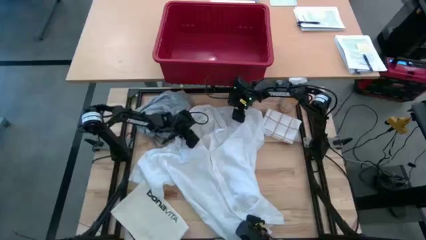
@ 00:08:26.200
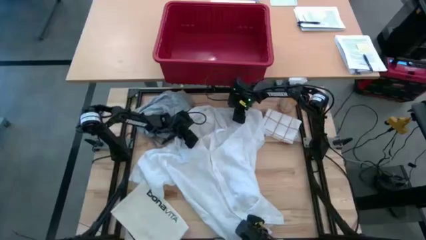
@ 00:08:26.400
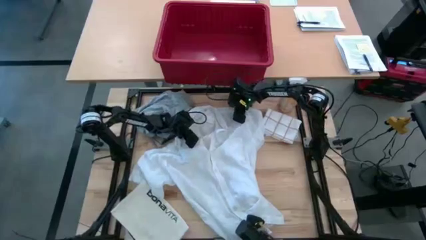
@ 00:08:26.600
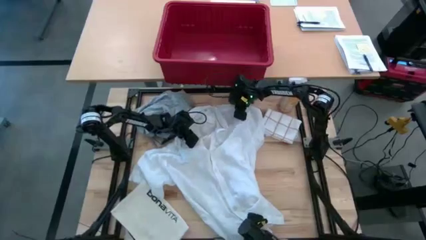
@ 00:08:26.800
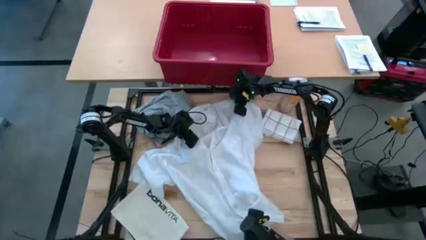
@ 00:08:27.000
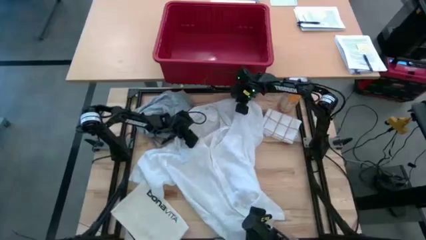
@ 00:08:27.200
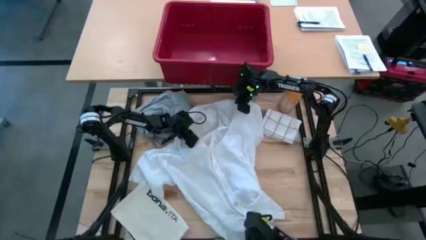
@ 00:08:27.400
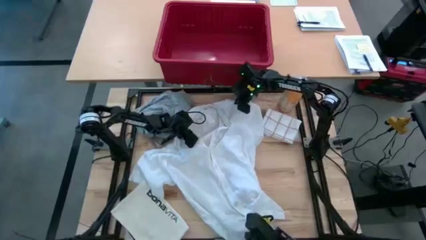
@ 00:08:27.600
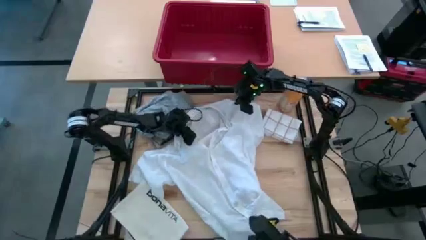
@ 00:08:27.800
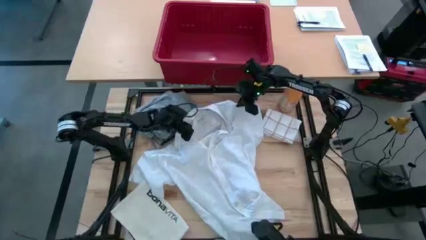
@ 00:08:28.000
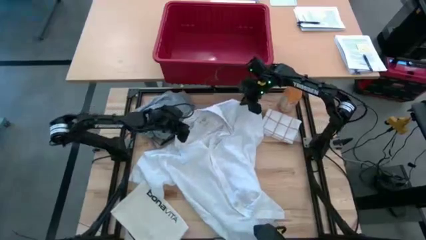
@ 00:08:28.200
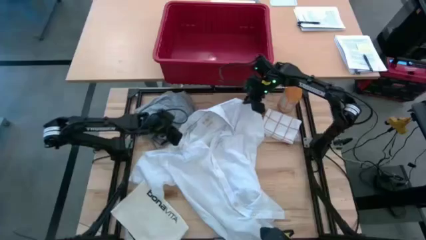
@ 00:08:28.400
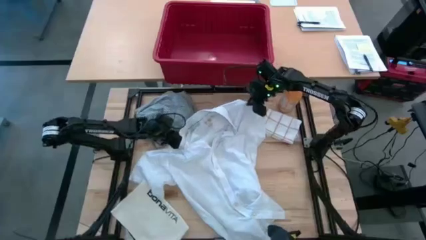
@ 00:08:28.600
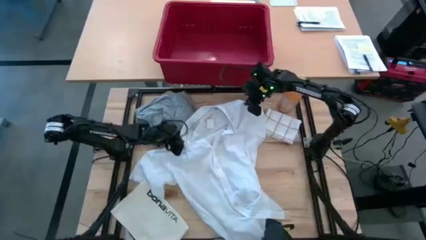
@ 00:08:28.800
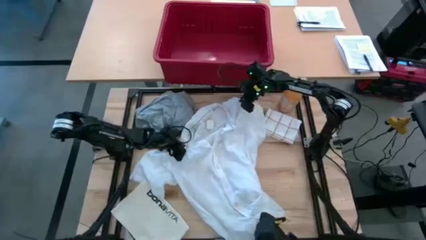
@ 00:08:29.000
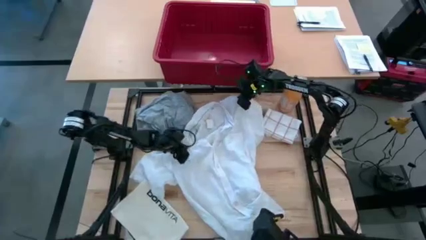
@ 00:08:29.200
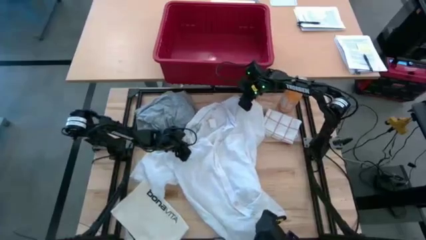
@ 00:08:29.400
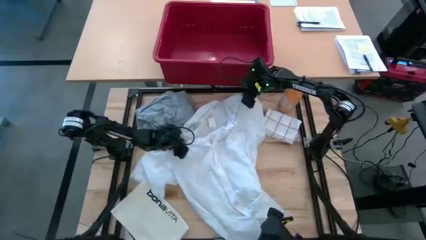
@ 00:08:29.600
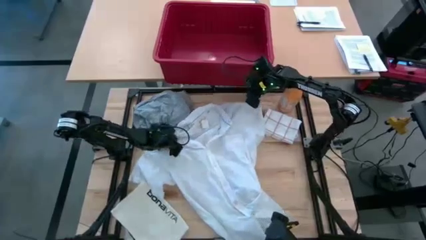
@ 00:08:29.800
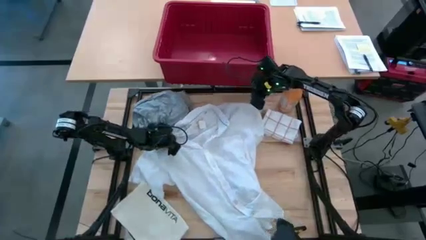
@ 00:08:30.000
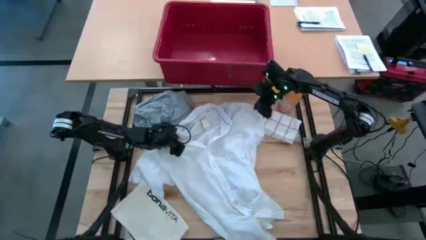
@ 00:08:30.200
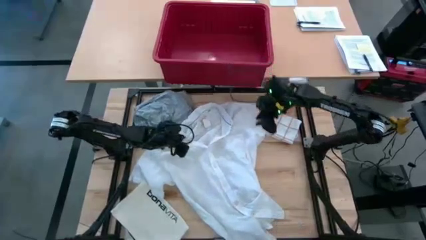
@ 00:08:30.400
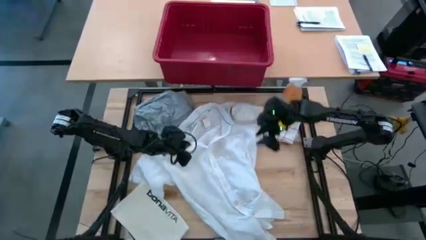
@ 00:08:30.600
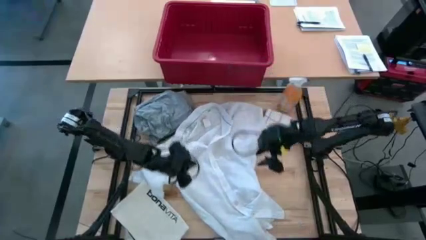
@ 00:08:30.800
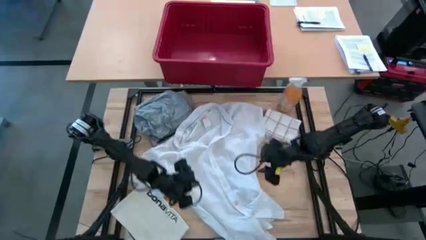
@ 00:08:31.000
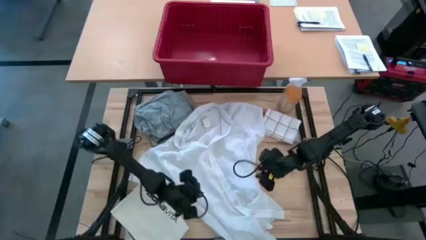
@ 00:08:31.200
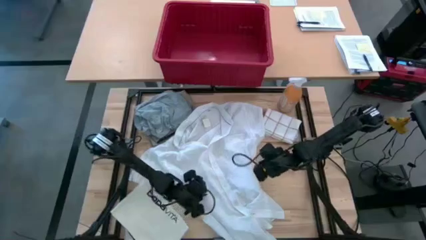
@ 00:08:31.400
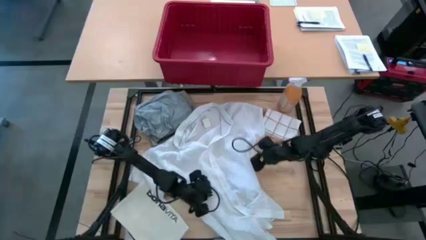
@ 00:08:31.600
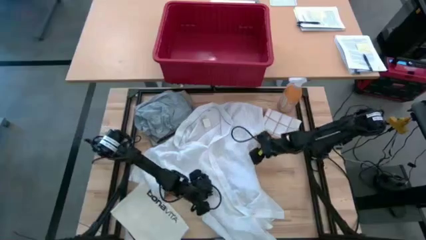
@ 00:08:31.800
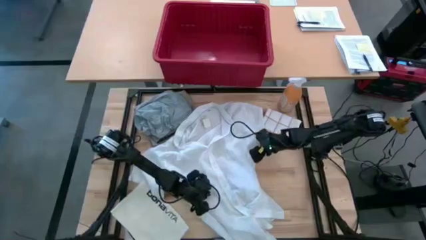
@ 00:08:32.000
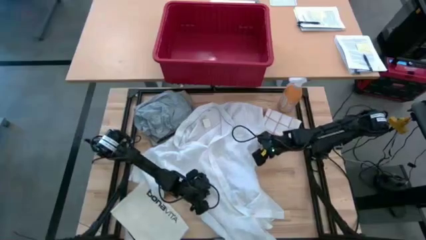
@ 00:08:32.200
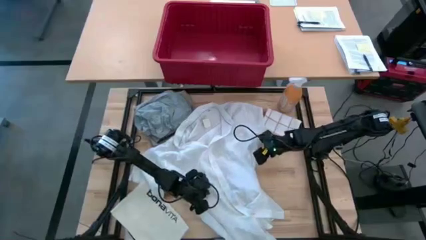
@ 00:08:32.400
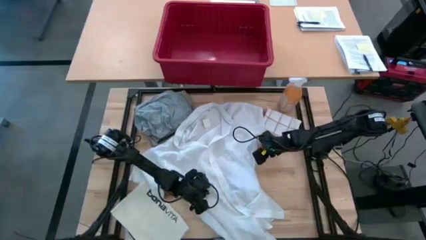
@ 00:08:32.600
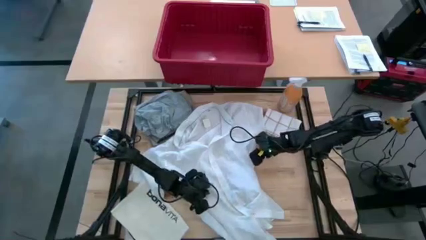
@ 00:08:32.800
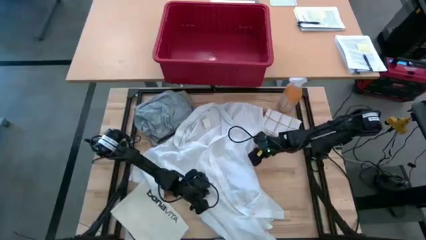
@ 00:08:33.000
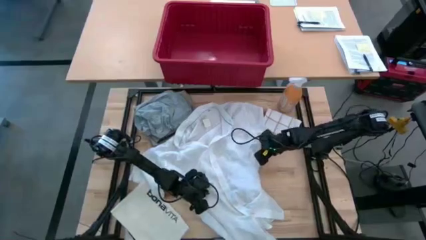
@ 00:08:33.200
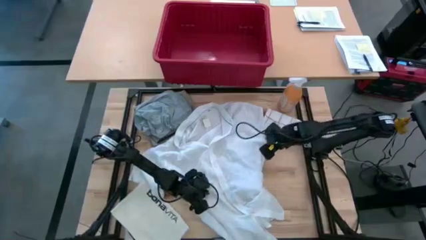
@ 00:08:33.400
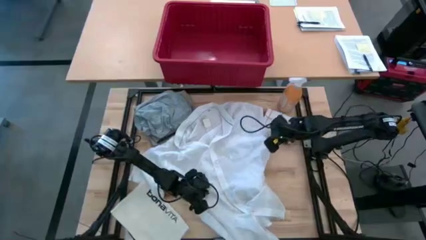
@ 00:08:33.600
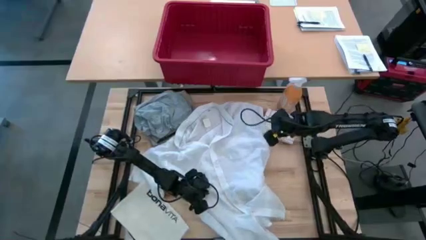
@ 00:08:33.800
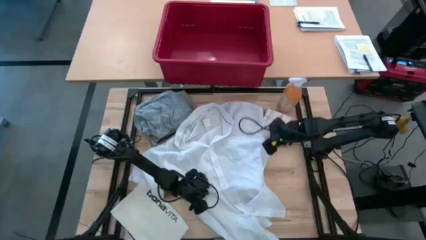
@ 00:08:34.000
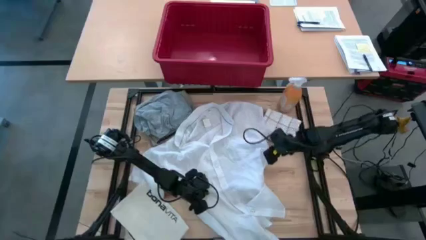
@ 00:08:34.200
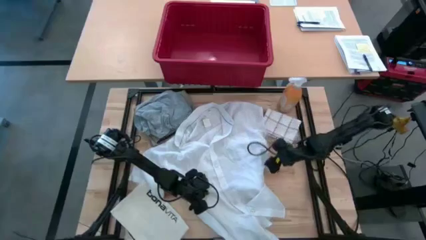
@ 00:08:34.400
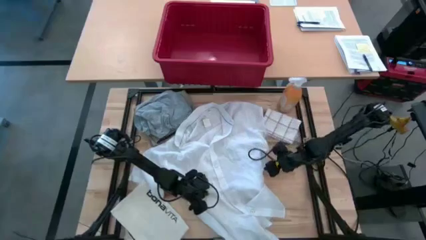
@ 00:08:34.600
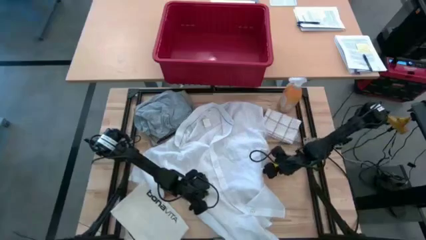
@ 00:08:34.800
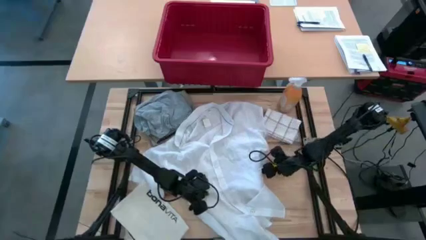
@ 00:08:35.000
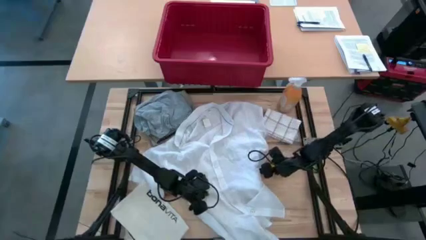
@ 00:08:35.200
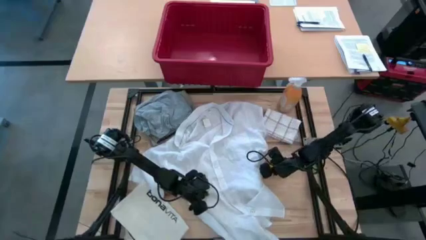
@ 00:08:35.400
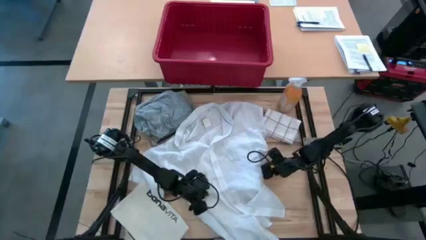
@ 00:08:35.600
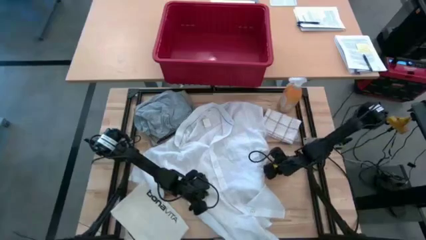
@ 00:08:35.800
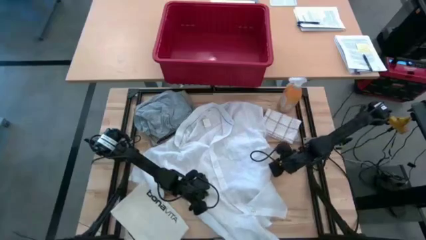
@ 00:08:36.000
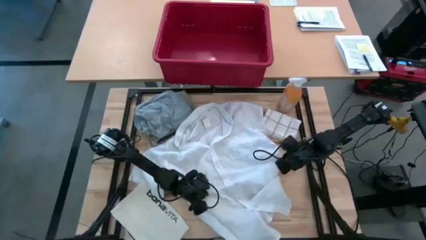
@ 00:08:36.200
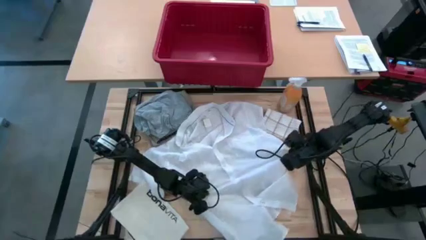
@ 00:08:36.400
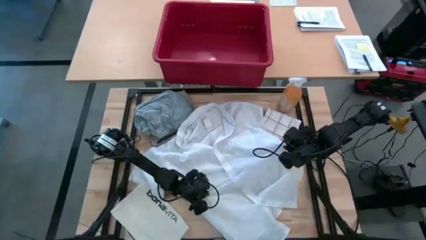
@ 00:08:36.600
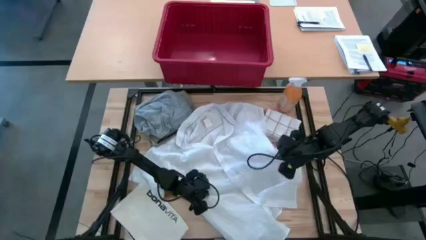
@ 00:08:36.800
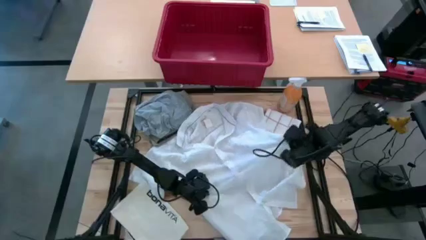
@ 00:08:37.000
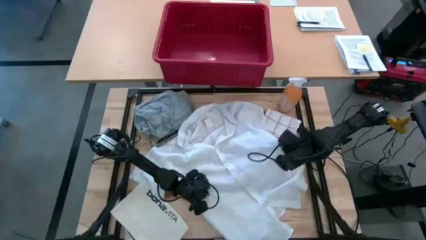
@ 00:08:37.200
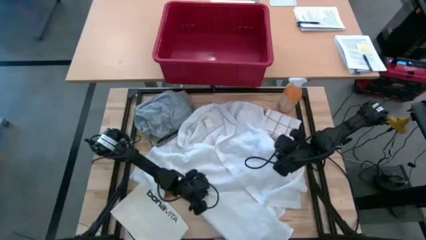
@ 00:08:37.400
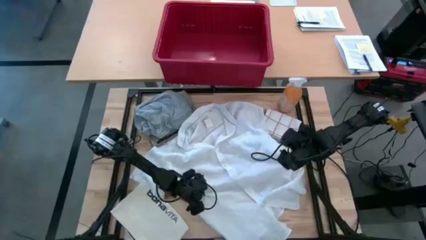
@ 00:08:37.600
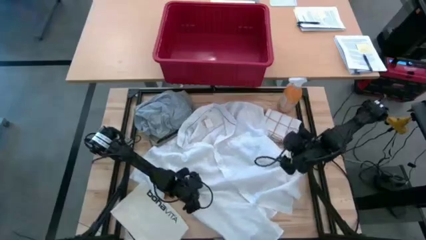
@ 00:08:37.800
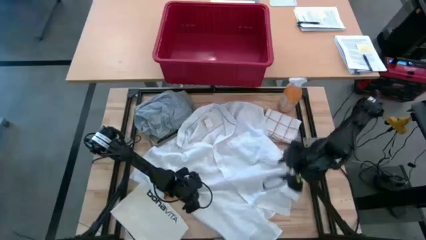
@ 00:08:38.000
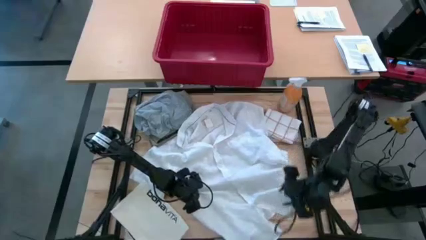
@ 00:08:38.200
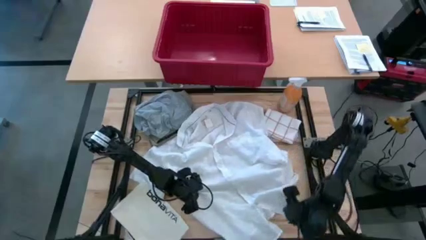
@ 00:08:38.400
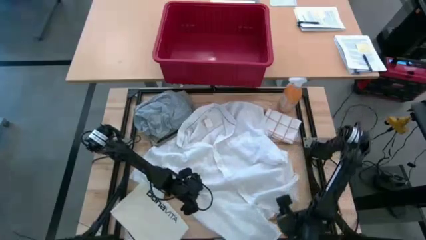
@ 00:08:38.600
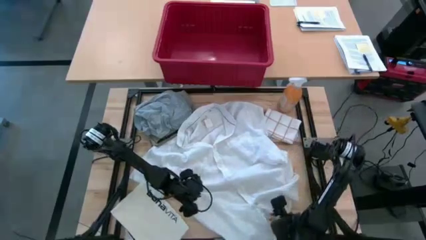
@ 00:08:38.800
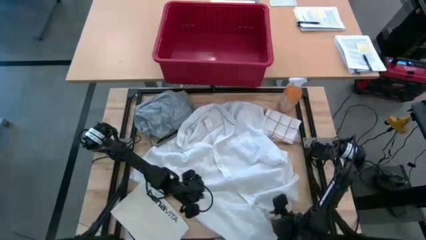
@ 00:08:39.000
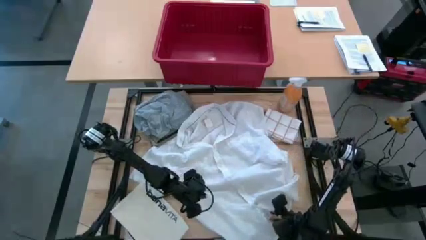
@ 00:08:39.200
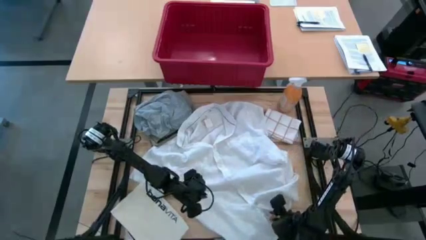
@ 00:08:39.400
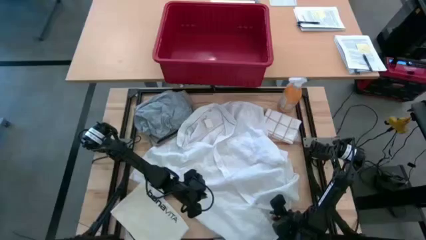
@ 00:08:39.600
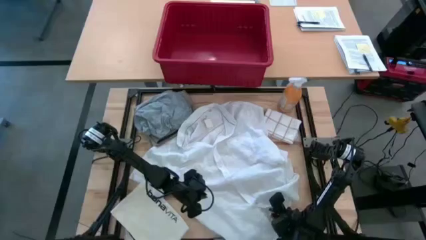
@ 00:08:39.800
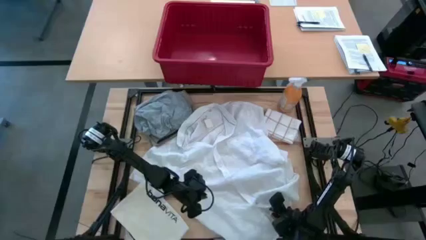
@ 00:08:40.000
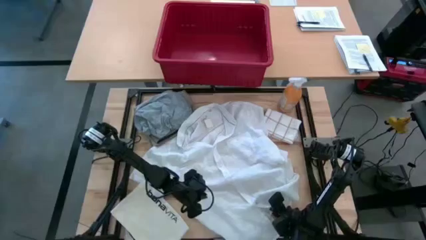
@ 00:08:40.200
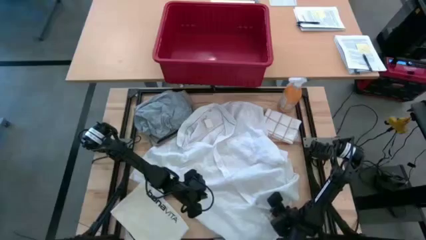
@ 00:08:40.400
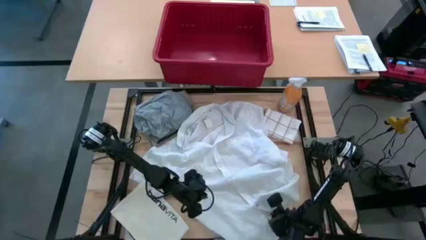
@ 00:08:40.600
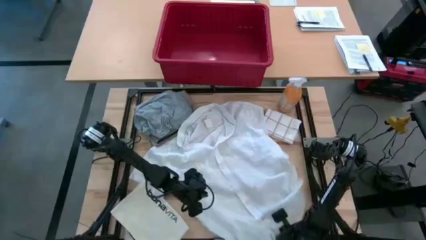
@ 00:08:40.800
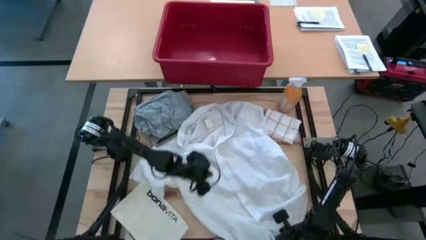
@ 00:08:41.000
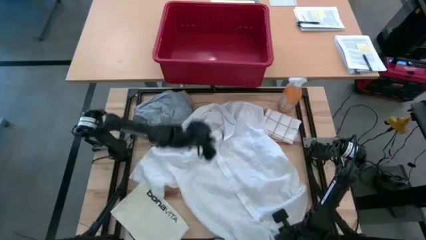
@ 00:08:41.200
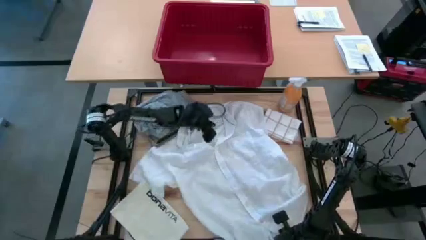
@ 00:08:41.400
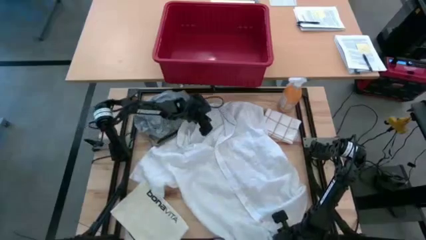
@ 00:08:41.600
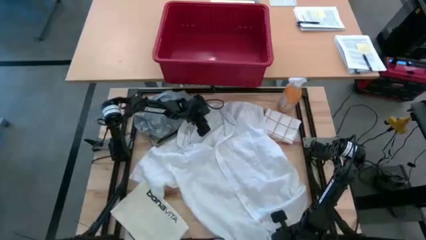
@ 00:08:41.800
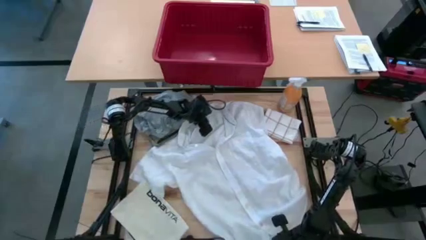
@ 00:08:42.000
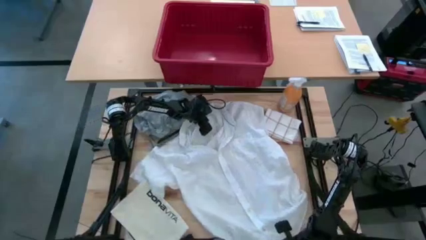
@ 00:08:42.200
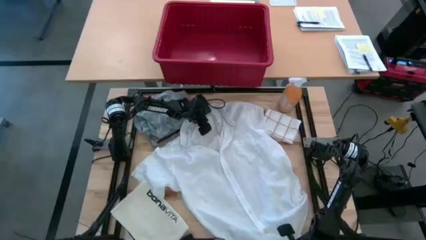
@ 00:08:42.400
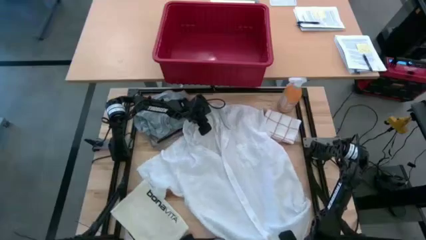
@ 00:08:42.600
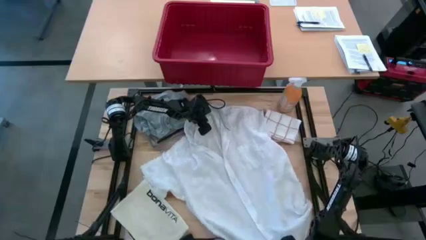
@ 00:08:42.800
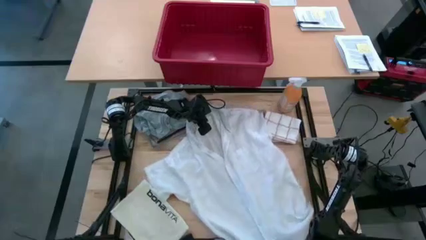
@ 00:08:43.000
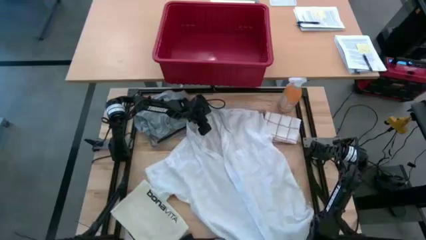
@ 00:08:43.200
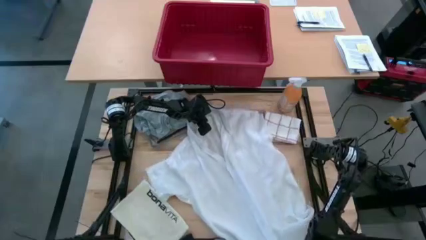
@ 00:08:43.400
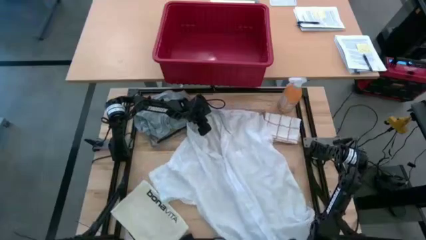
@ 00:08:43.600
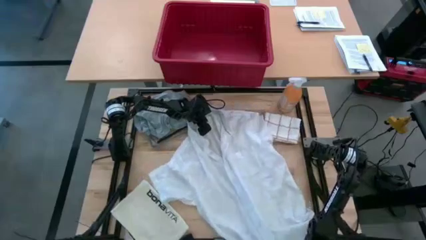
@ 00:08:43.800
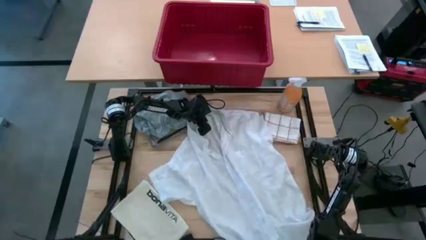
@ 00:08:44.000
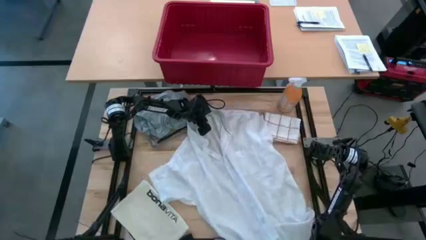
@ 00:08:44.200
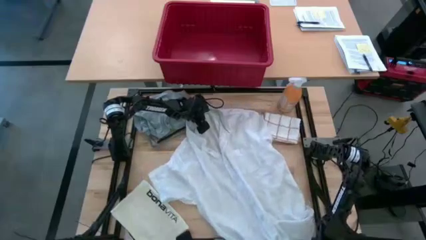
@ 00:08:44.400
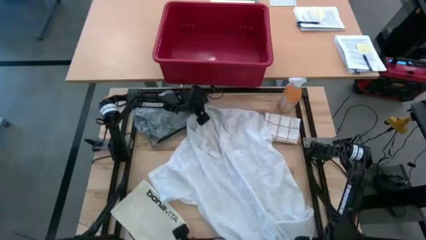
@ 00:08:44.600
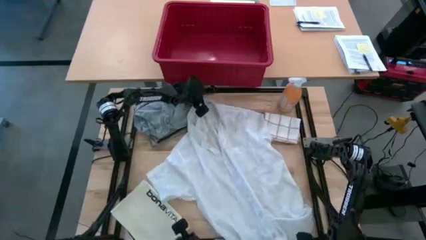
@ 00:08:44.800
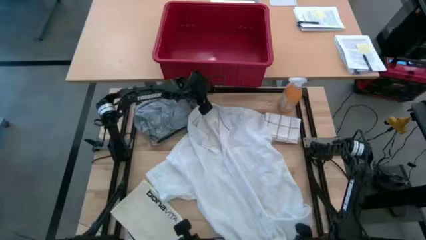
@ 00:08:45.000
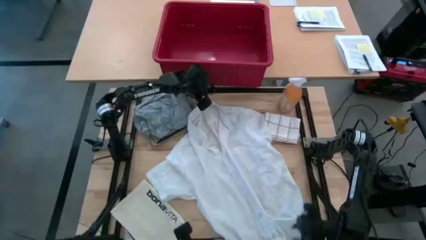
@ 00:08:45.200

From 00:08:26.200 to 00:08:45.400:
Task: Fold laundry
Fold the white long sleeve shirt
